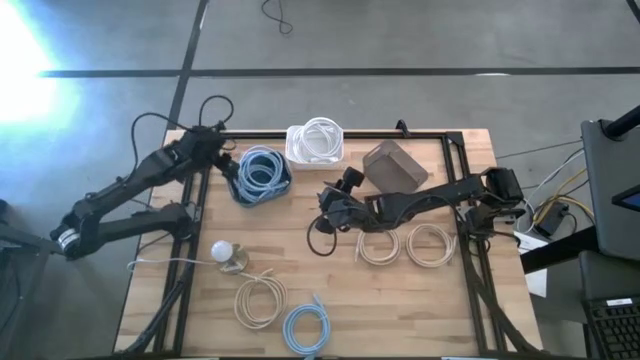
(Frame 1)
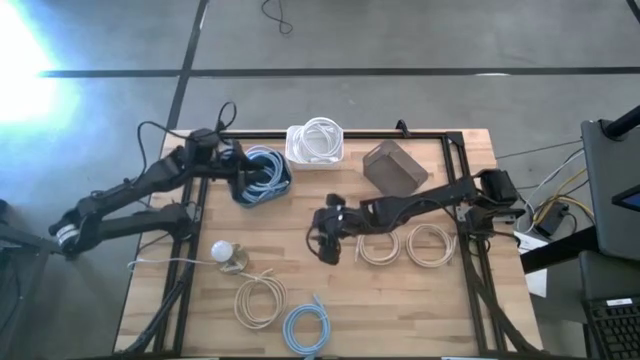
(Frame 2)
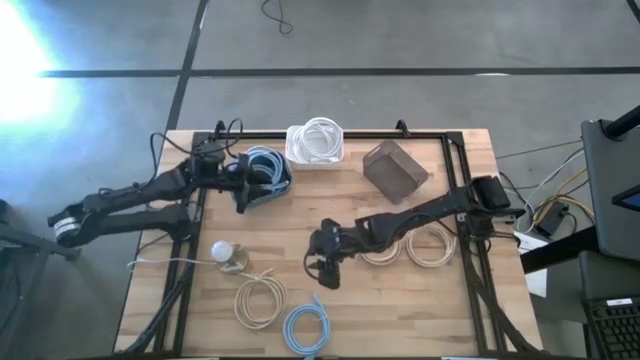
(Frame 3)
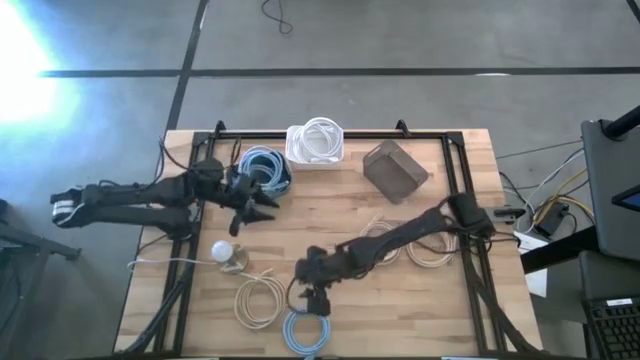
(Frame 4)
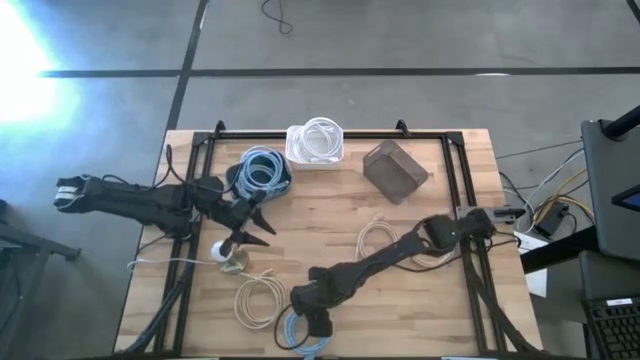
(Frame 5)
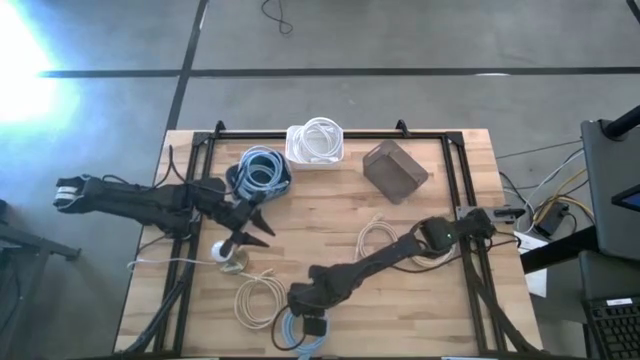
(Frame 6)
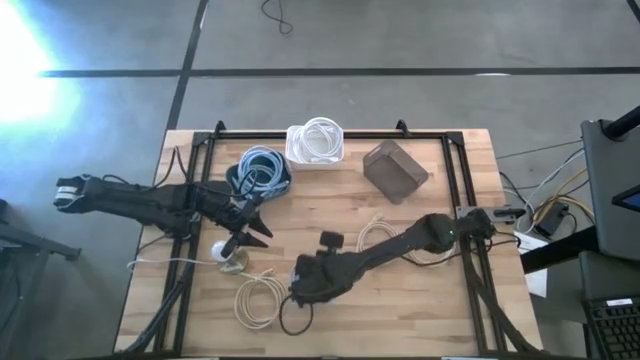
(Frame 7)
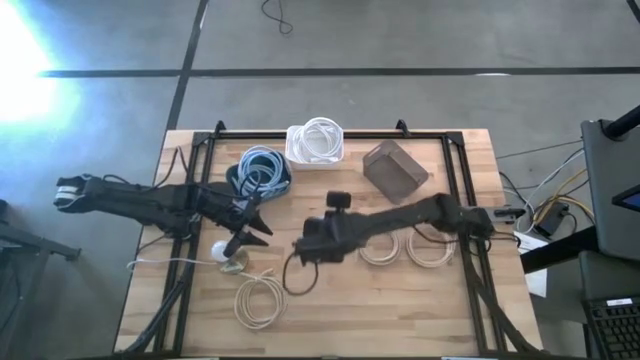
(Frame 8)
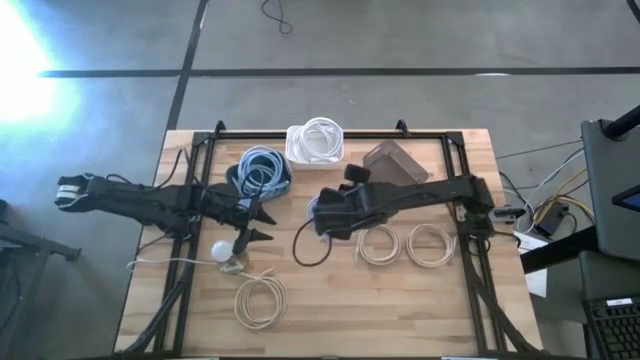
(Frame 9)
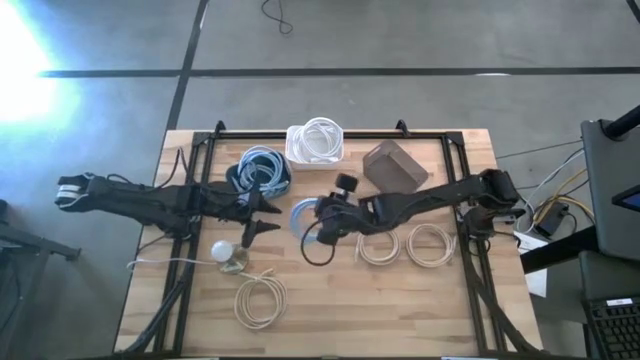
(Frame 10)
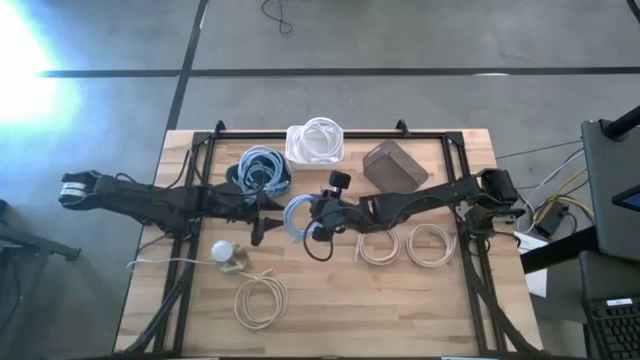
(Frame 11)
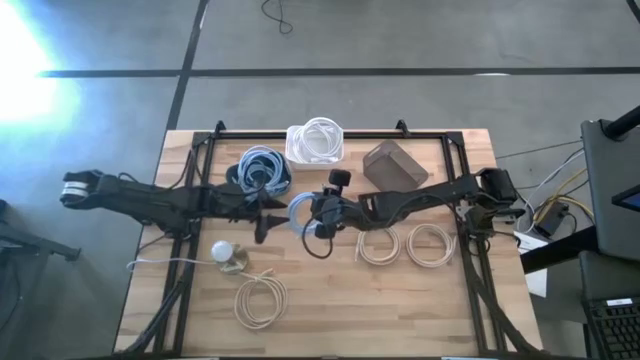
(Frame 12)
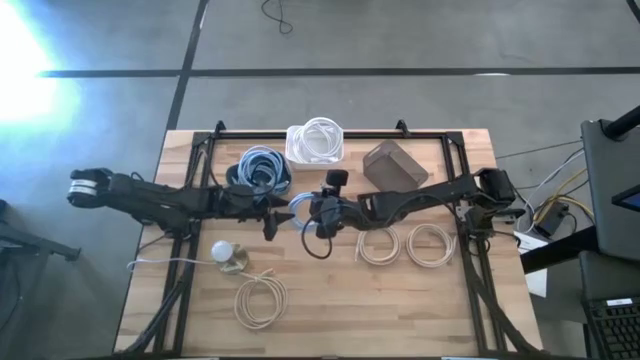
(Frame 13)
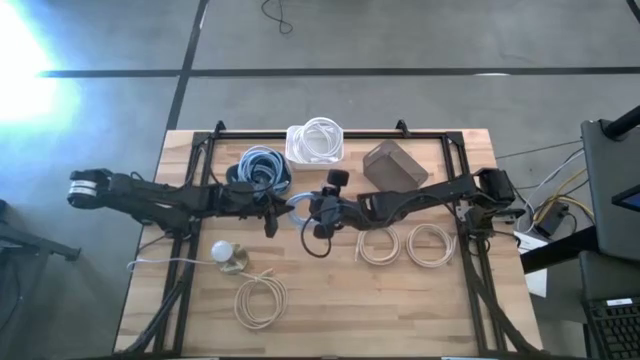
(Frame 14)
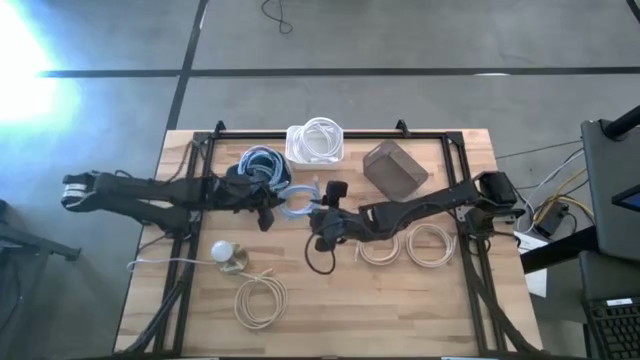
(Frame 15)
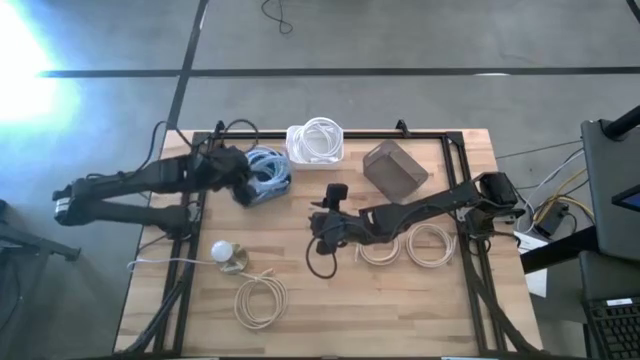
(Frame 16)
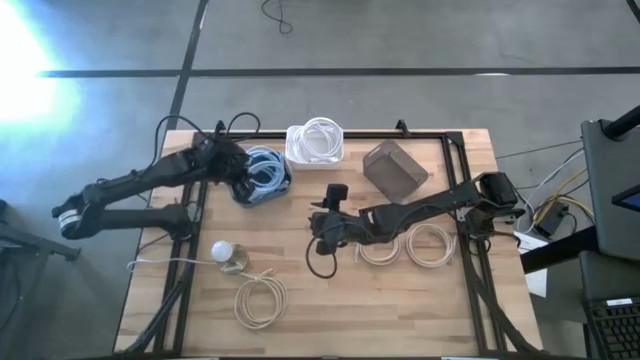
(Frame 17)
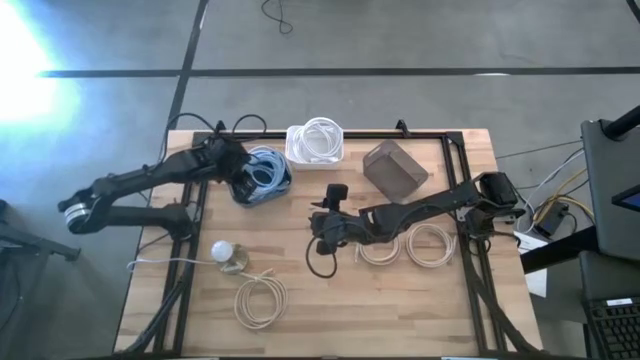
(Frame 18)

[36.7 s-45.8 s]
Task: Sort HDMI cables
Put the blue HDMI cable into the blue bin

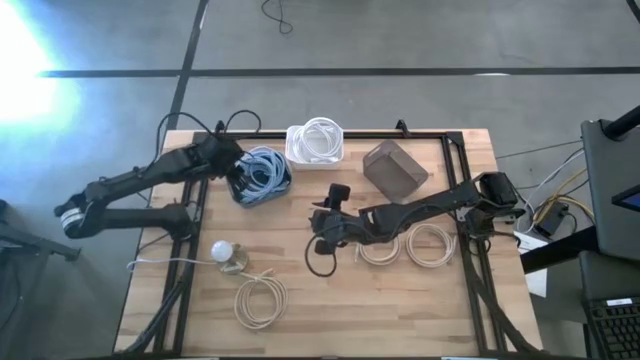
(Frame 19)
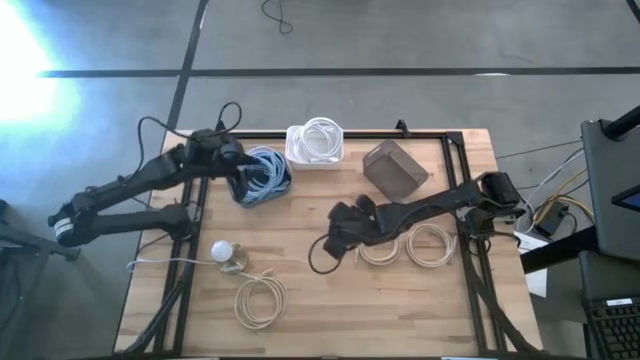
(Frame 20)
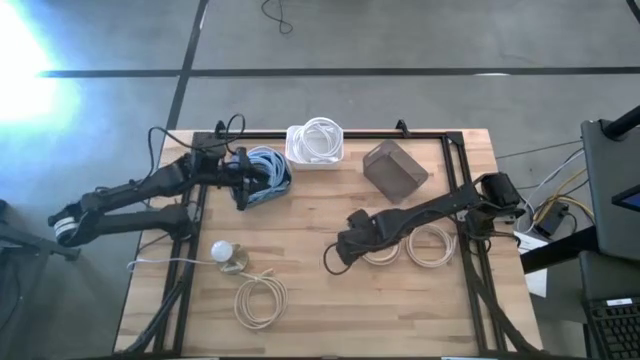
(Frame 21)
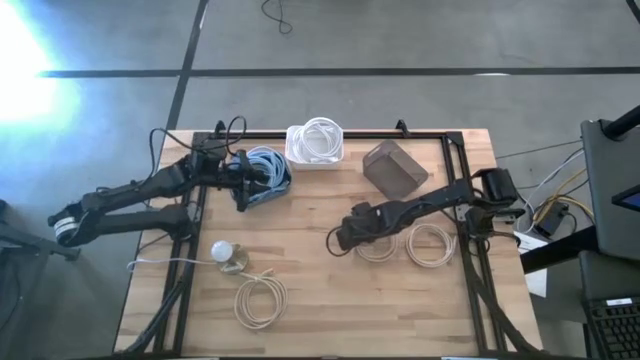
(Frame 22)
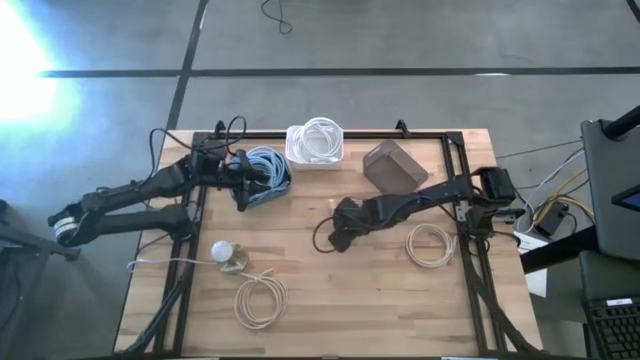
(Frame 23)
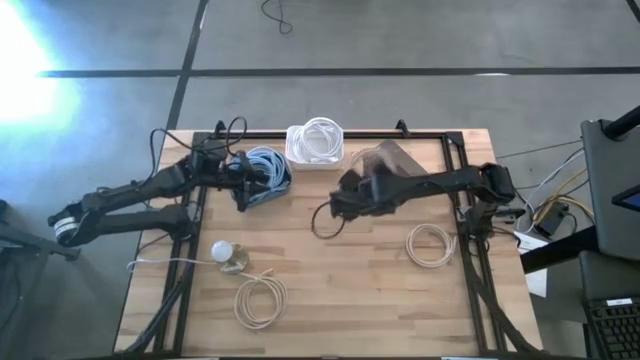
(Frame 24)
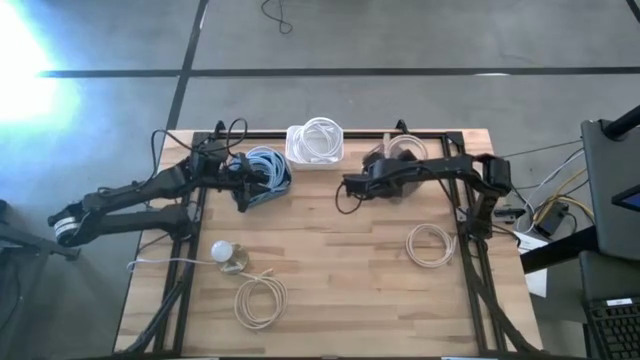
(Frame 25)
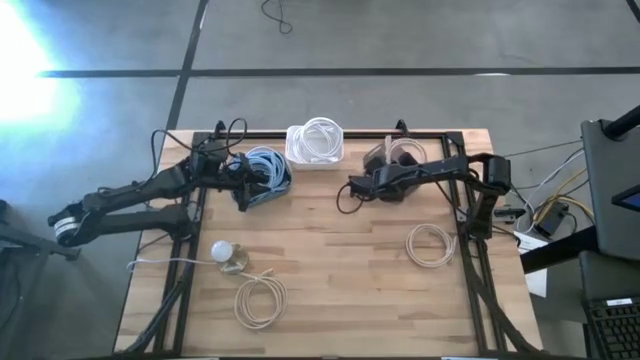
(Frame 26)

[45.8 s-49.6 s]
Put the top left brown HDMI cable into the black bin

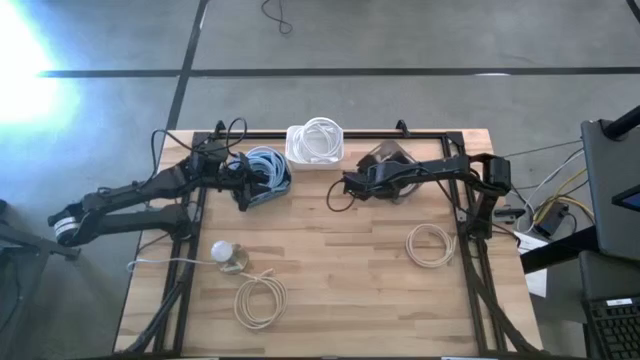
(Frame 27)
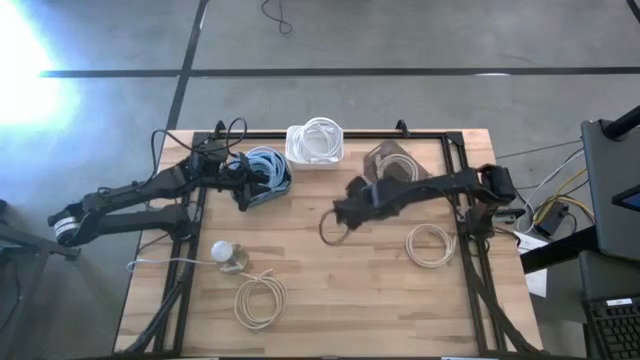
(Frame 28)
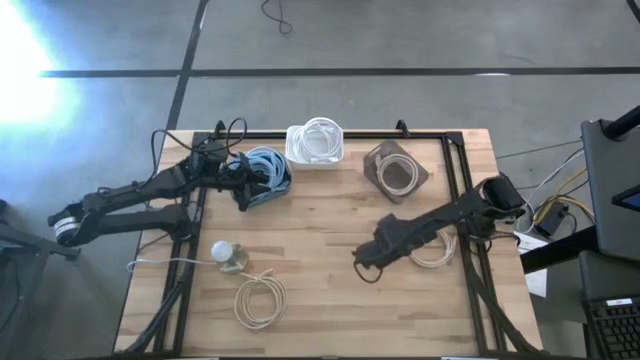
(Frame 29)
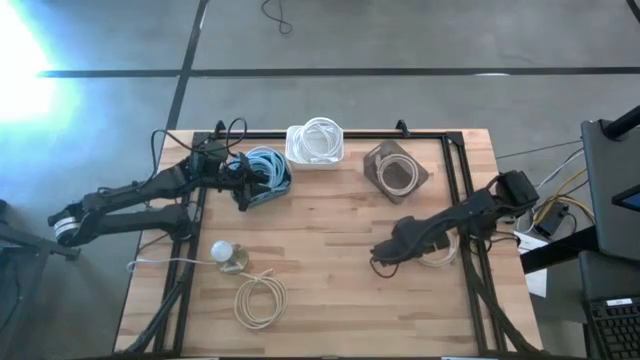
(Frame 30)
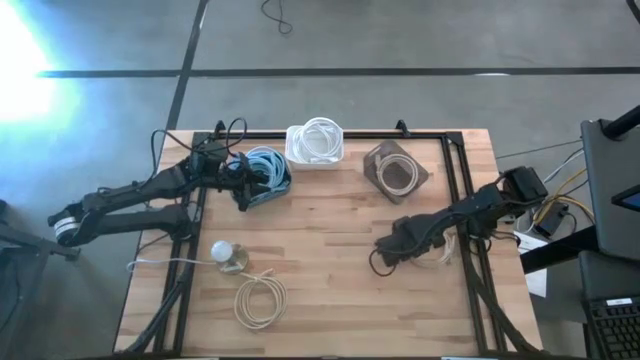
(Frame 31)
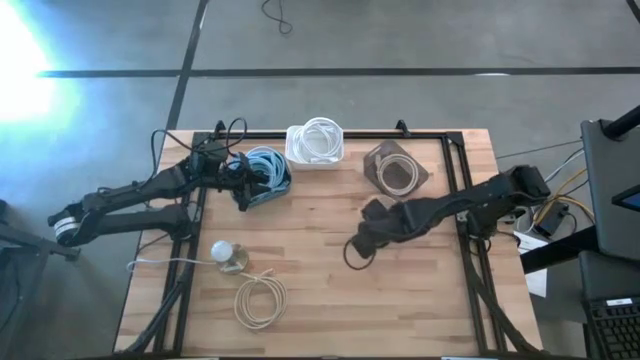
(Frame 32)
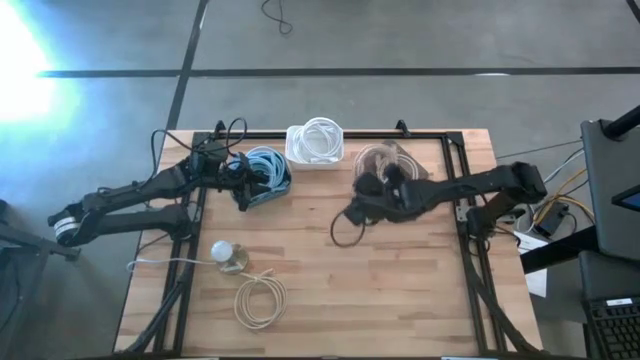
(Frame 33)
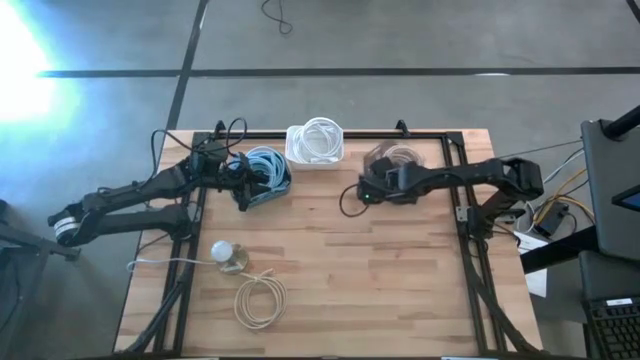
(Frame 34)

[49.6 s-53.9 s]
Put the top brown HDMI cable into the black bin

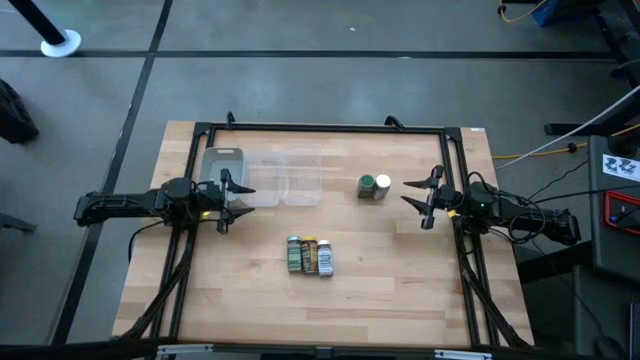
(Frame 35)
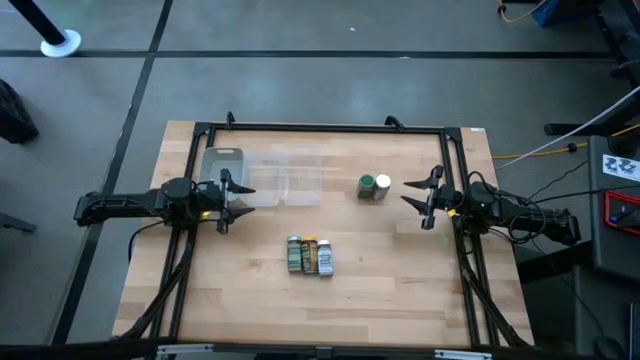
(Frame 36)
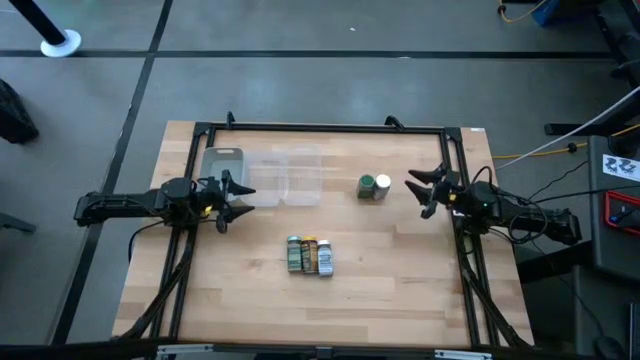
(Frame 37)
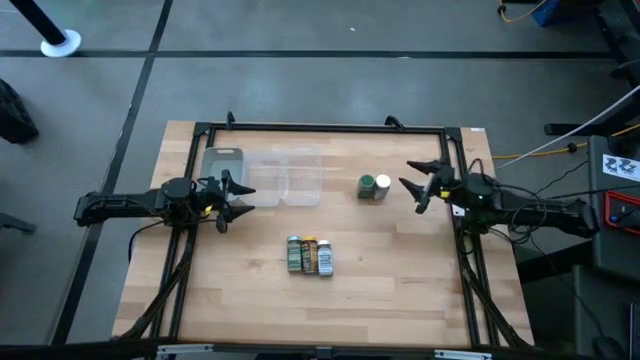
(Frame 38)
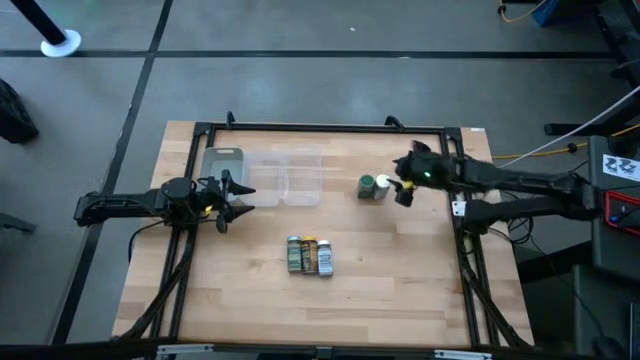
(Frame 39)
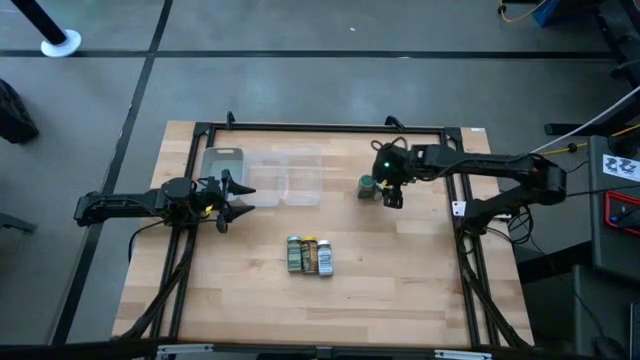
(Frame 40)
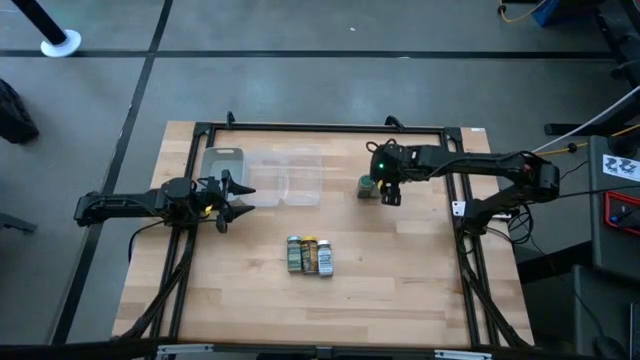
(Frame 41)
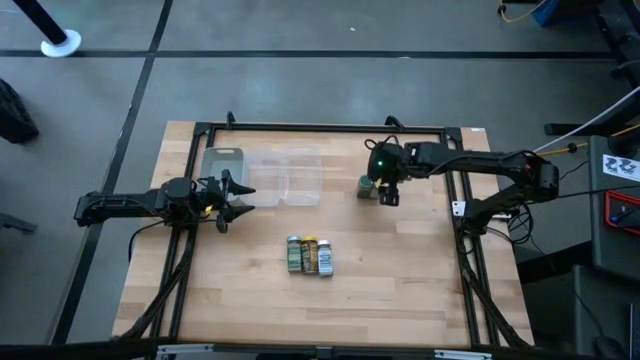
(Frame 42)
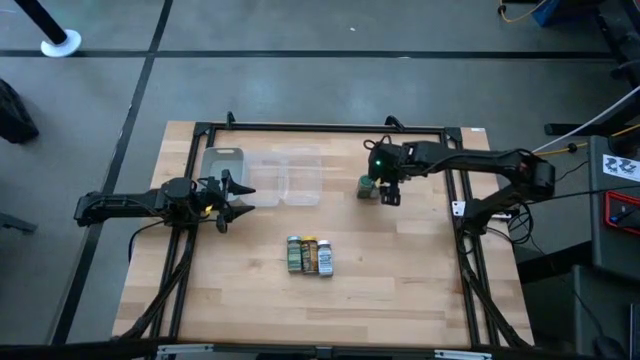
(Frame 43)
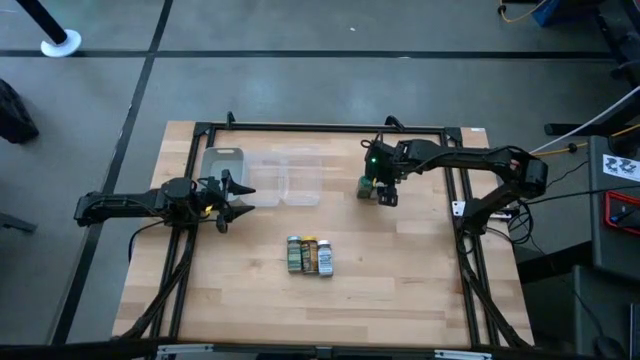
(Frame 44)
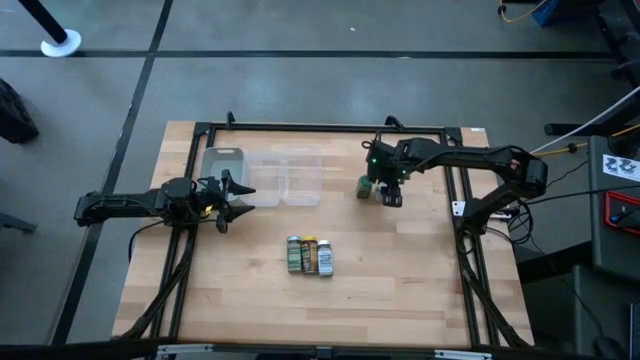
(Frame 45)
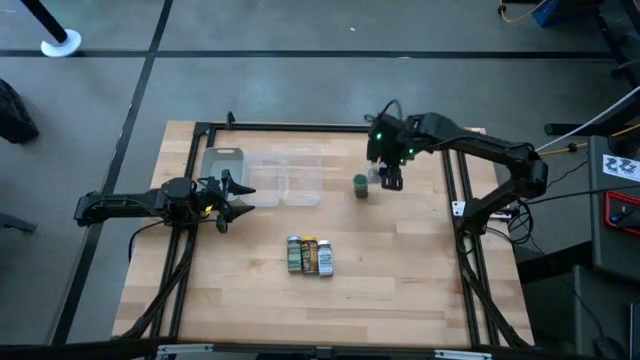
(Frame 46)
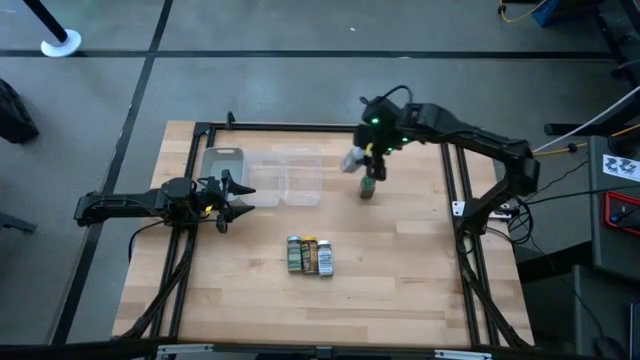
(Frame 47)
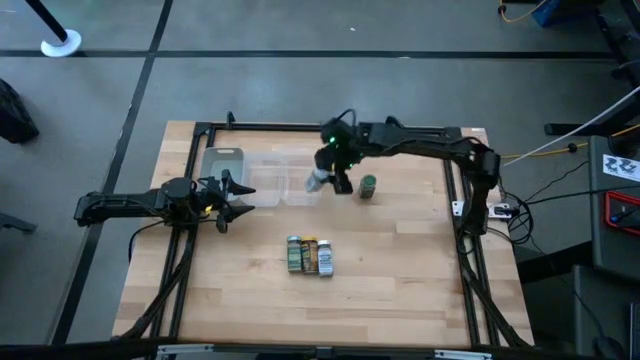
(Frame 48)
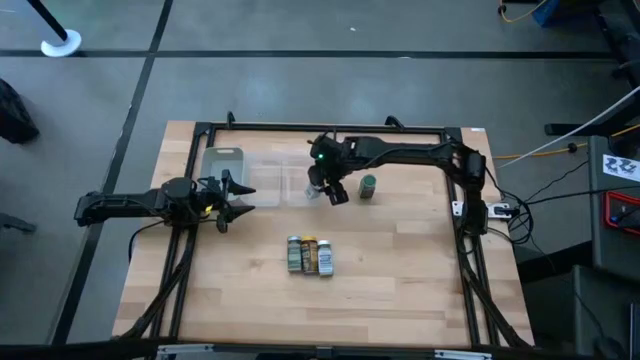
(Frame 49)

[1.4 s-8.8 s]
Task: Sort spices by type
Put the top white seasoning bottle into the right transparent bin
